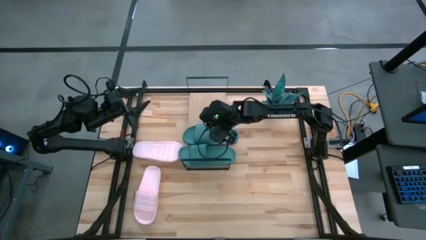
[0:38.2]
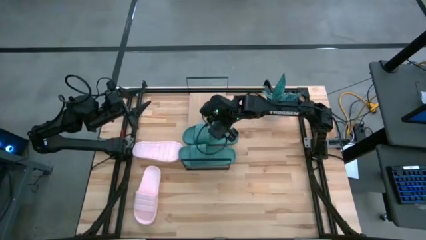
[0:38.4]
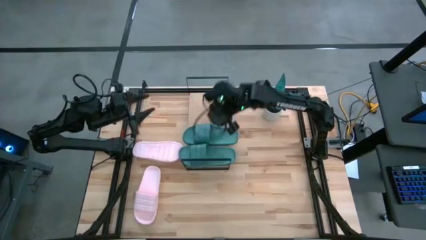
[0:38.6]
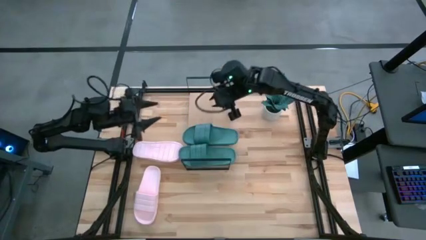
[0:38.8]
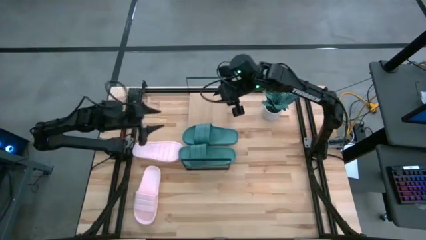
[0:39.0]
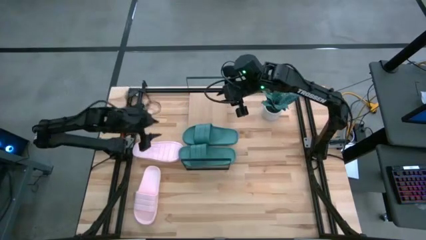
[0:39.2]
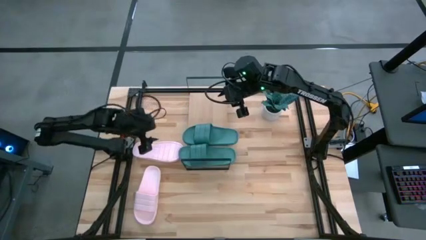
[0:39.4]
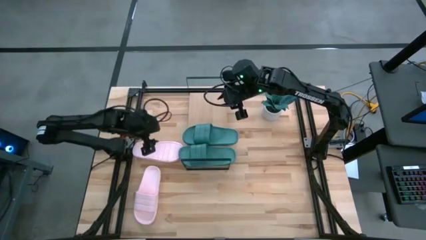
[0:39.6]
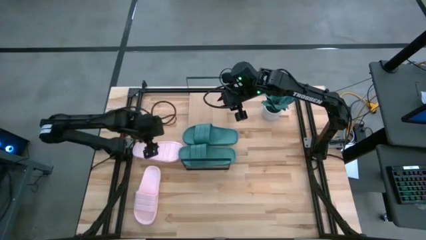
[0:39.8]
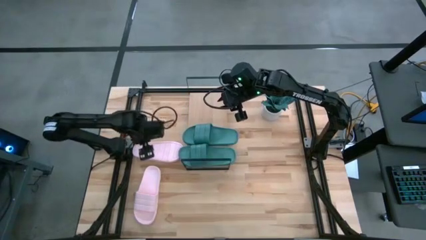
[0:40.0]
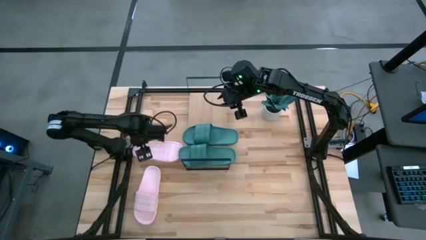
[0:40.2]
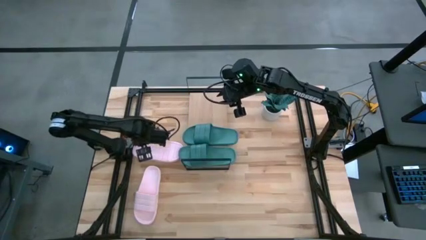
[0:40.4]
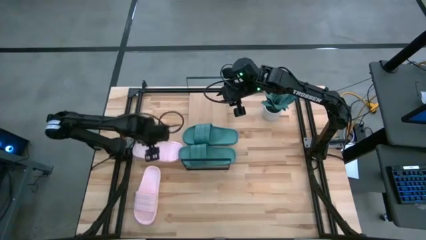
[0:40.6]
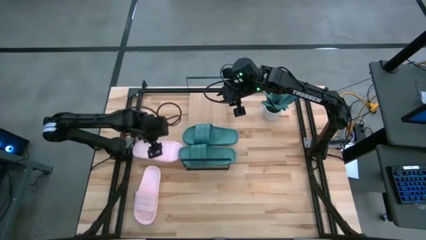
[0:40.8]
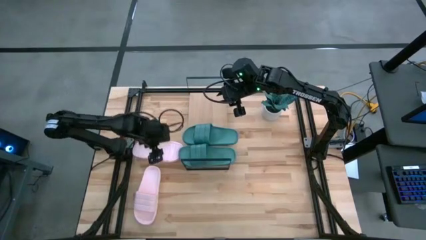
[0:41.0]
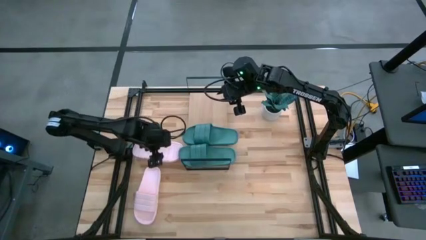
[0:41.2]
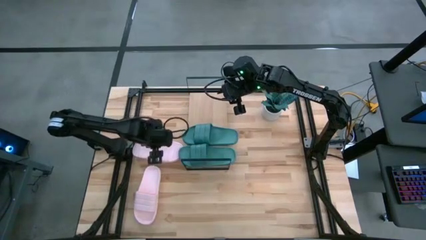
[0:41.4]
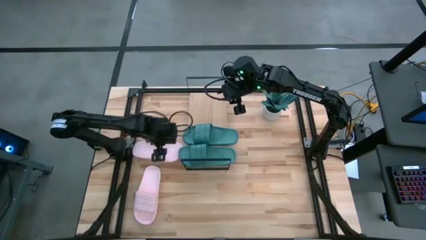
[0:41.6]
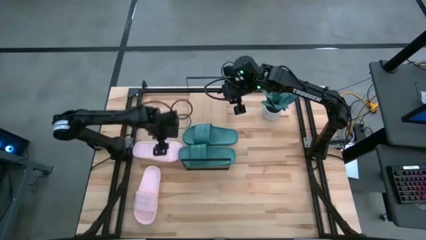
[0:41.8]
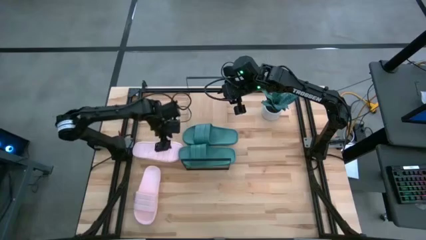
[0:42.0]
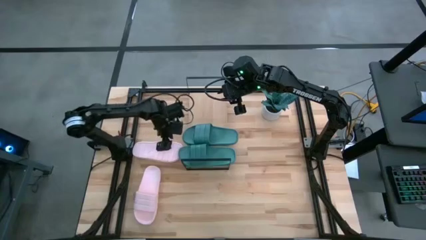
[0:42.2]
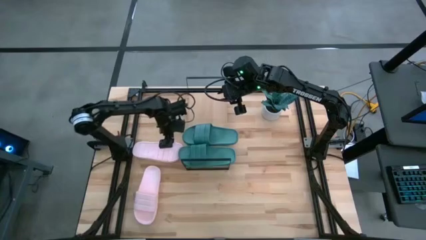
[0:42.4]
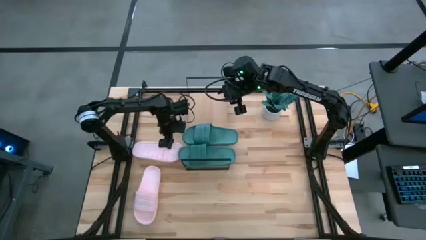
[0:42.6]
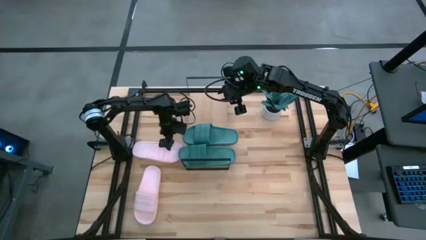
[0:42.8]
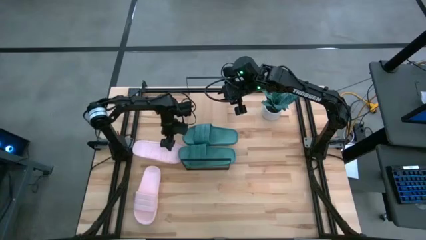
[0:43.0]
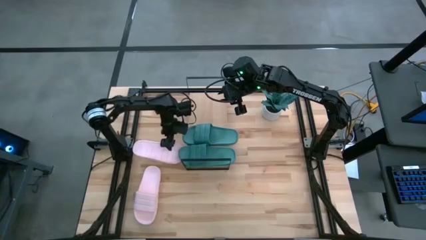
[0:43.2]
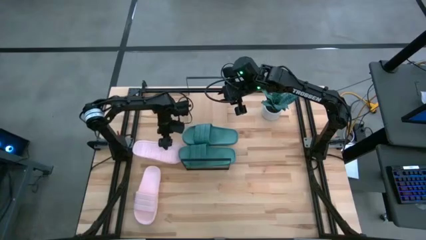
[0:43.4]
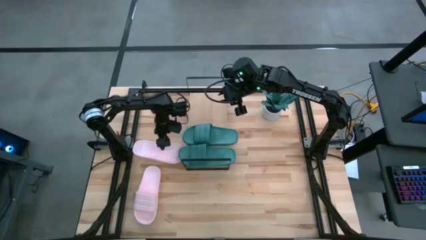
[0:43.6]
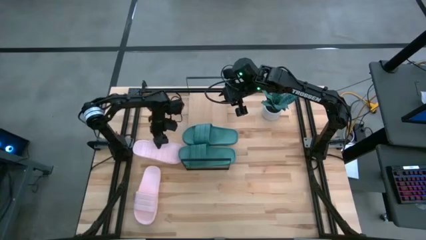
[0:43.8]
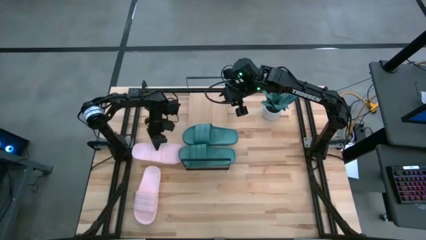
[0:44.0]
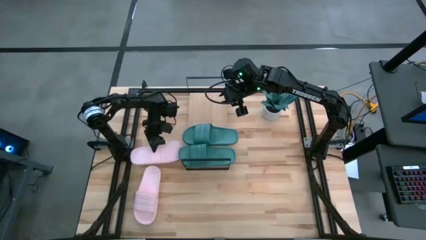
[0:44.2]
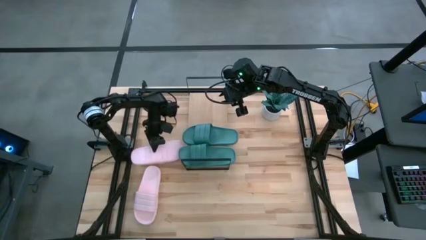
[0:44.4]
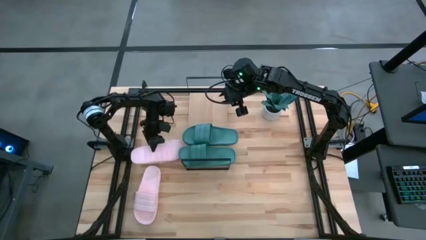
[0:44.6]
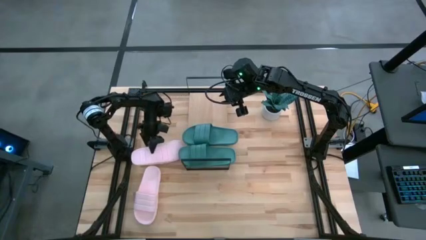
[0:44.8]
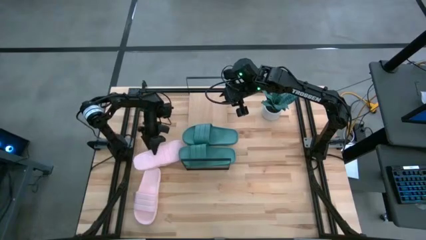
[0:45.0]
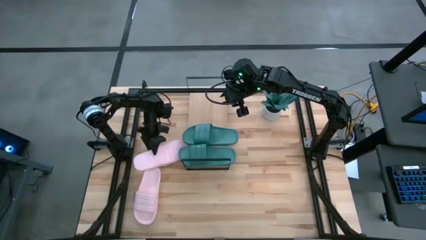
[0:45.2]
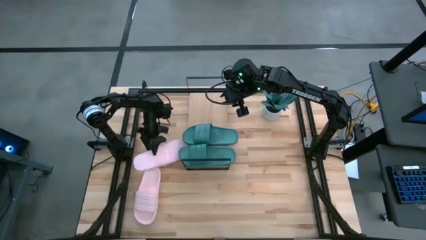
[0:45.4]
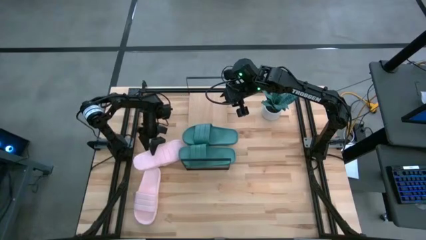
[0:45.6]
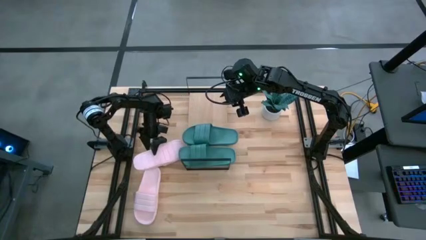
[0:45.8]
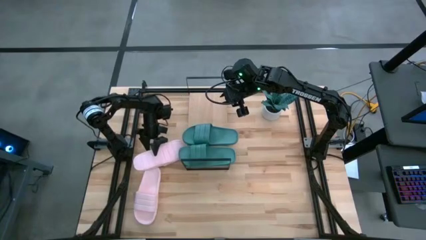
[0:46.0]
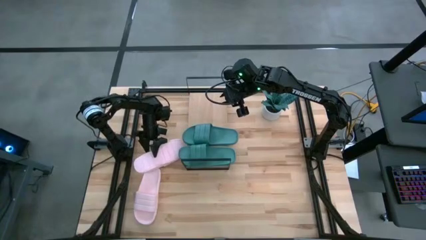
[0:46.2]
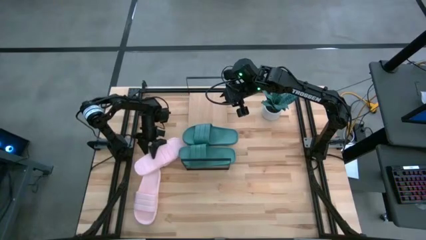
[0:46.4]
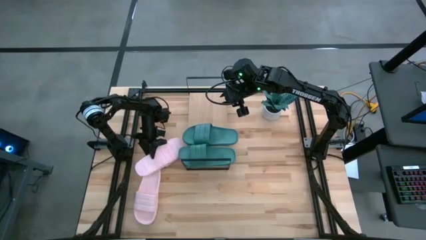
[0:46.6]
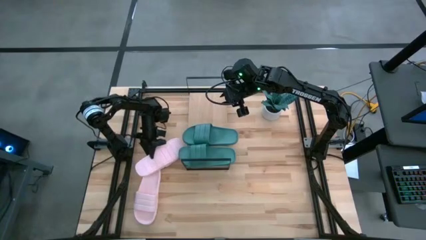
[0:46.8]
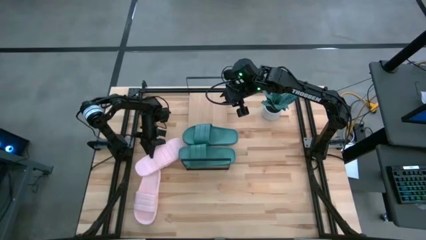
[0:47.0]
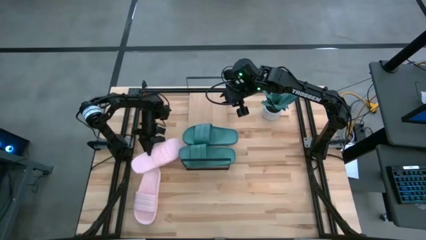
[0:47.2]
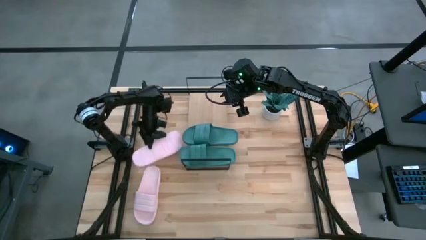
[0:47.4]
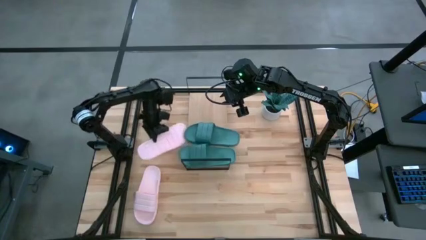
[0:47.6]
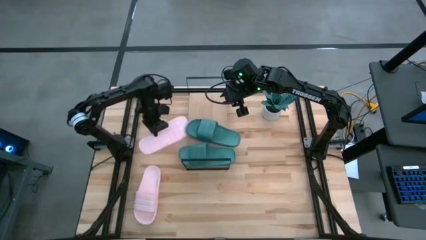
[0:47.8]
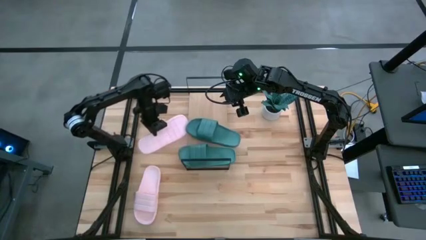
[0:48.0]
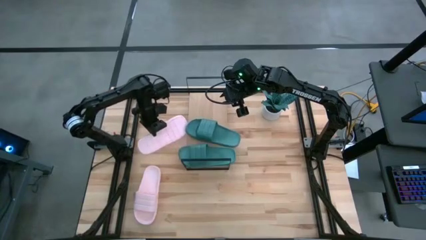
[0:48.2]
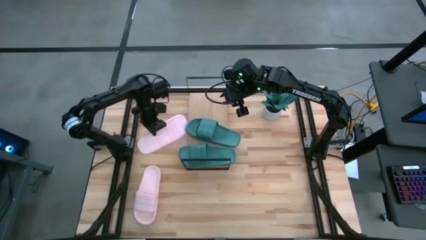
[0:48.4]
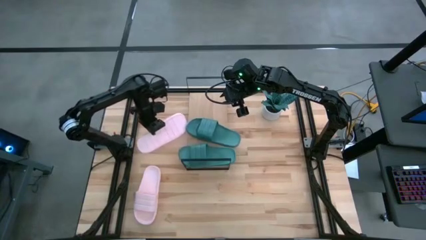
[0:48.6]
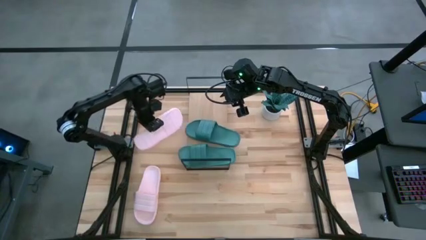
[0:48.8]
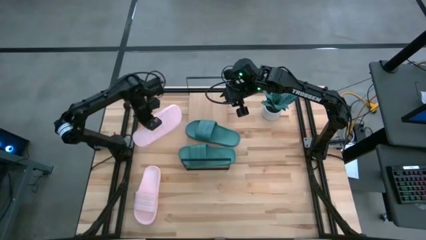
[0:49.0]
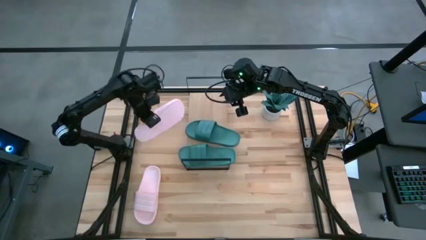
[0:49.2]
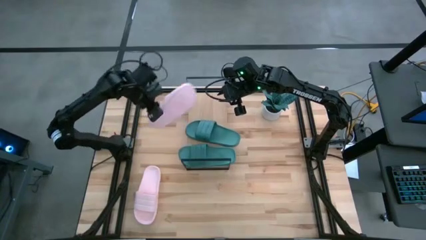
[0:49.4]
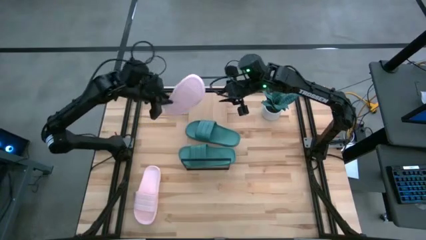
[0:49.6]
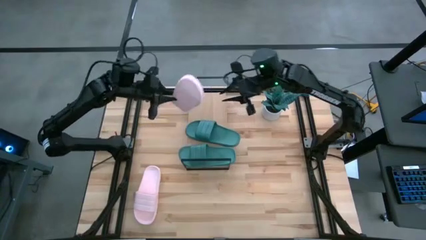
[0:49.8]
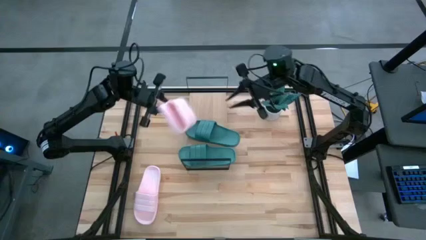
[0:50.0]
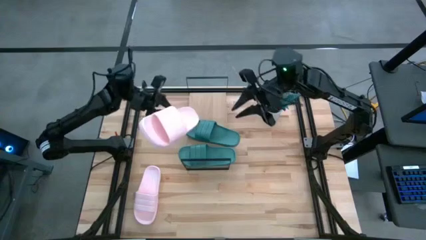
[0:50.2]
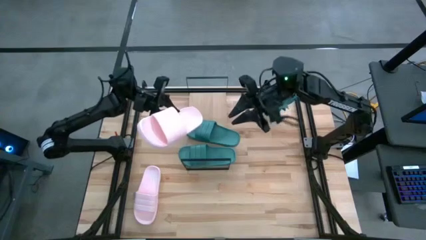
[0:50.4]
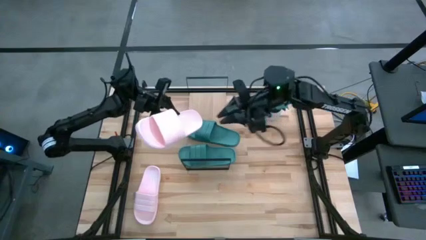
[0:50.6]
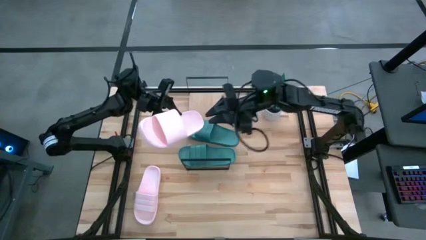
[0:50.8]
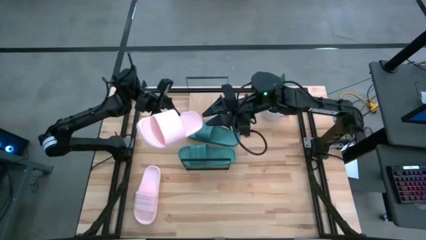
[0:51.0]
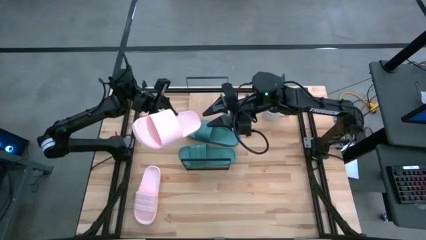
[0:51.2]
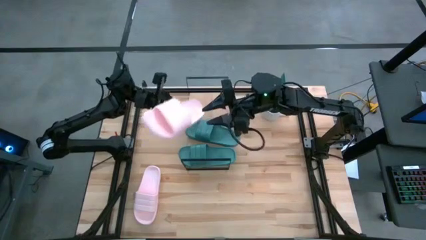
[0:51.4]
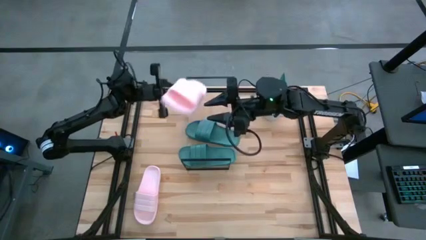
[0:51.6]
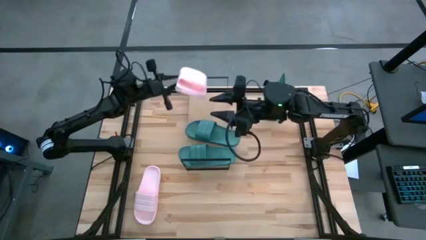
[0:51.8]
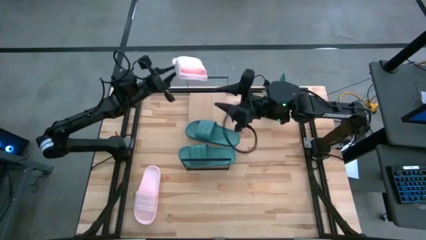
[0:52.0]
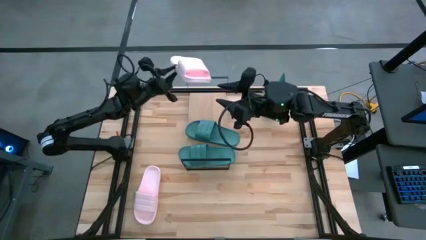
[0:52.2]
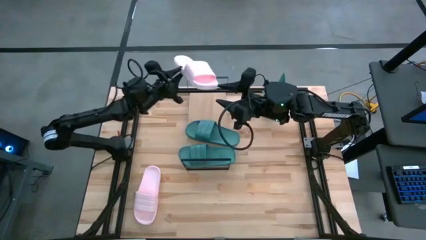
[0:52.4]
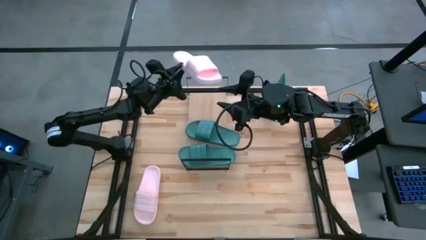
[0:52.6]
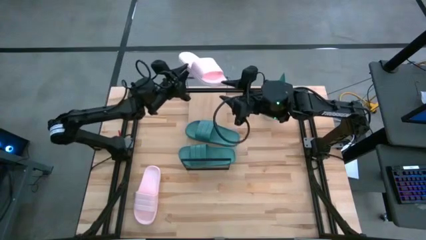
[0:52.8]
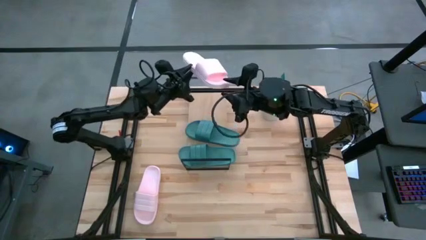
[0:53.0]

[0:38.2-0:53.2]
Task: Pick and place slides into the shelf
Put the top pink slipper on the shelf

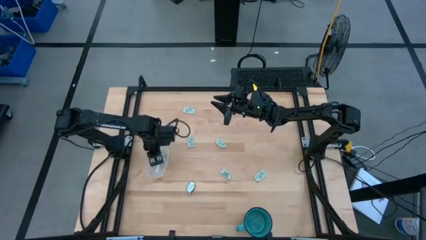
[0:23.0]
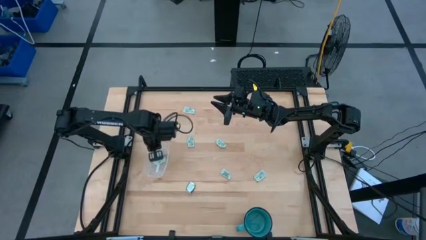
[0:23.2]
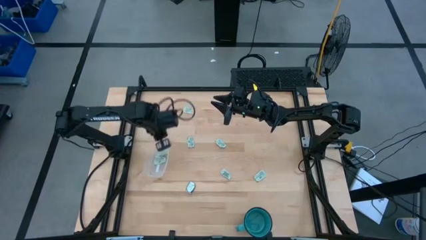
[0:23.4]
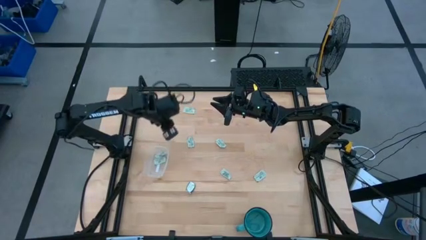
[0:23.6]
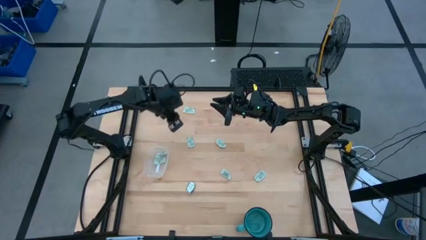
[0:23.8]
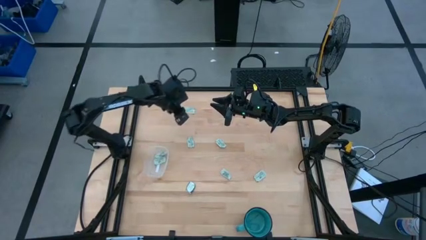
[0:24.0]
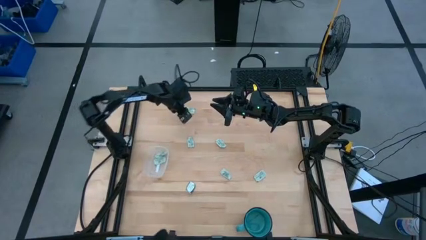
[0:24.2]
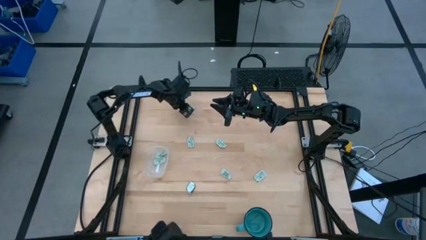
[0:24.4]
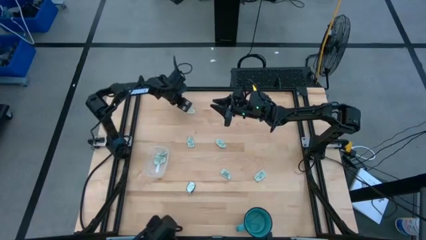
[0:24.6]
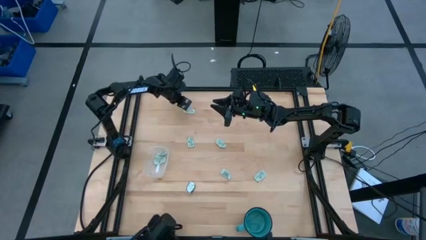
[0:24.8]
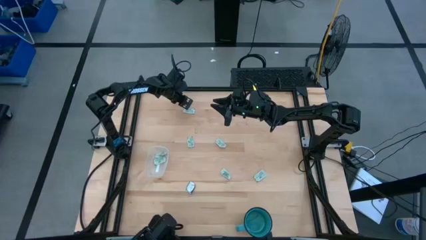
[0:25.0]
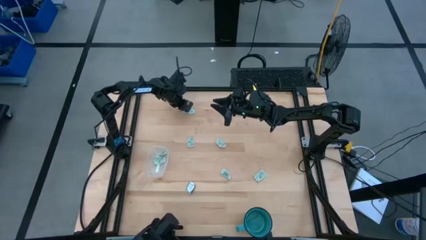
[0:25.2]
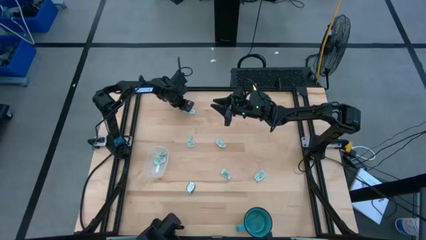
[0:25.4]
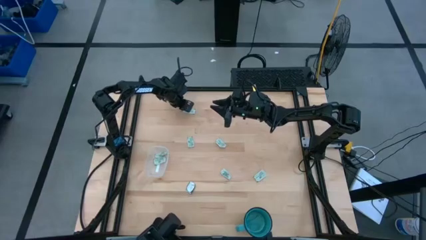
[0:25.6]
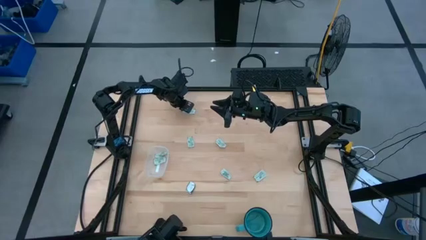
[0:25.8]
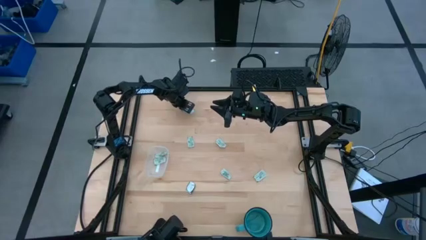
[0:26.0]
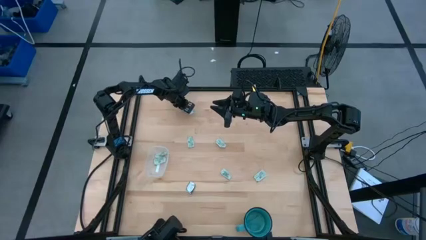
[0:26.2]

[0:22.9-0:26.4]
Task: Pick and place Stevia / Truvia into bins
Put the light green stevia packet into the transparent bin
